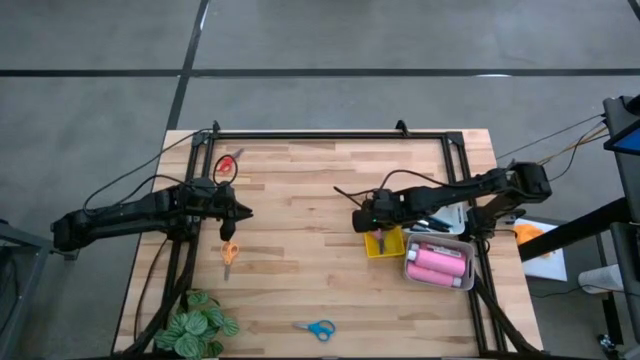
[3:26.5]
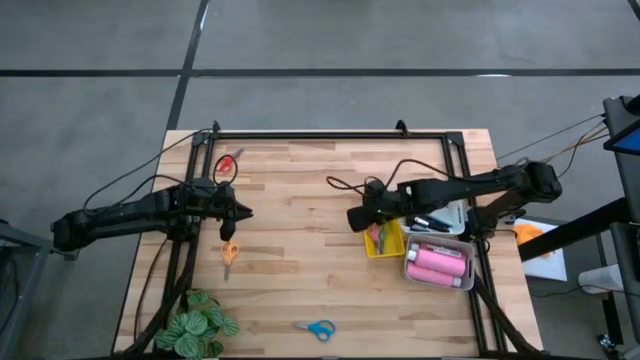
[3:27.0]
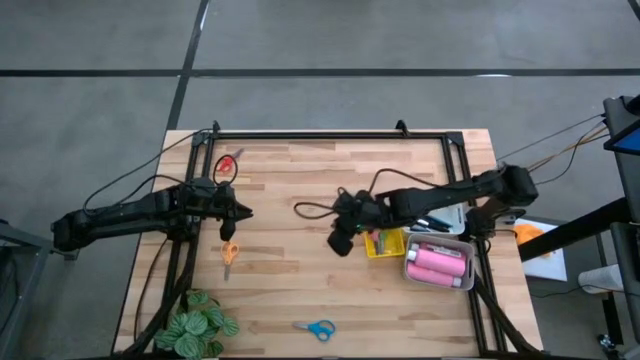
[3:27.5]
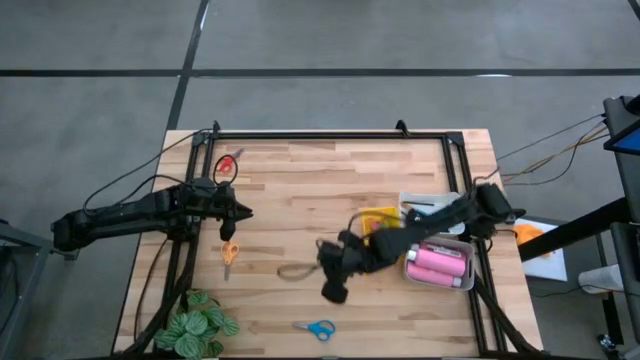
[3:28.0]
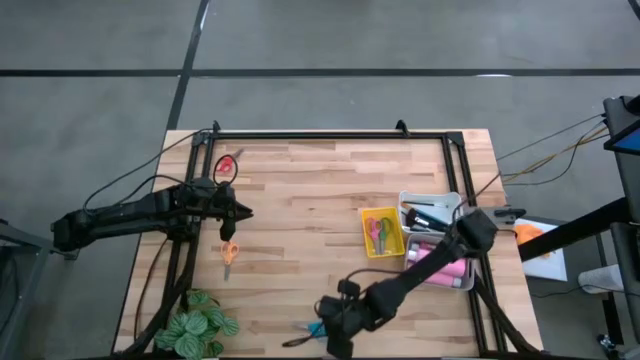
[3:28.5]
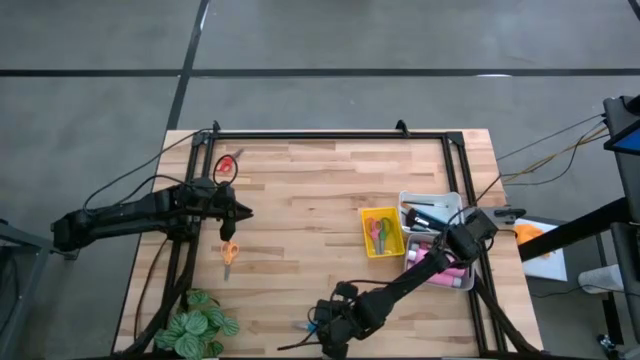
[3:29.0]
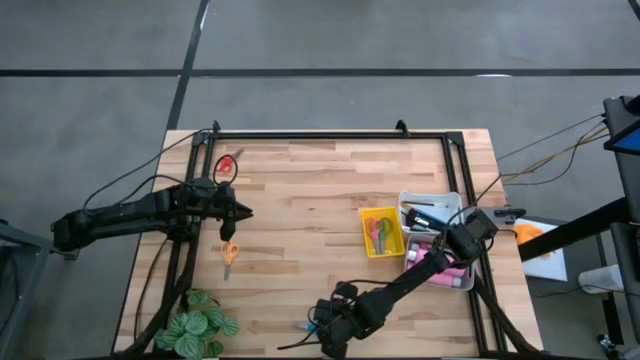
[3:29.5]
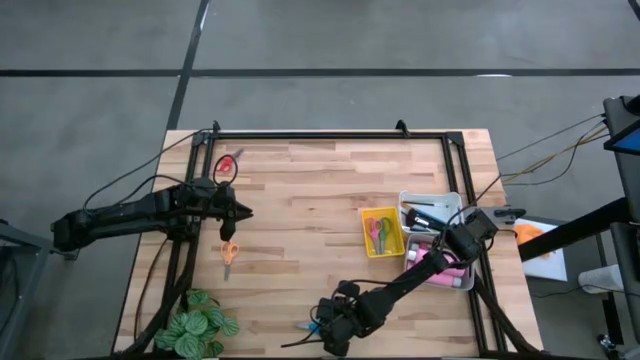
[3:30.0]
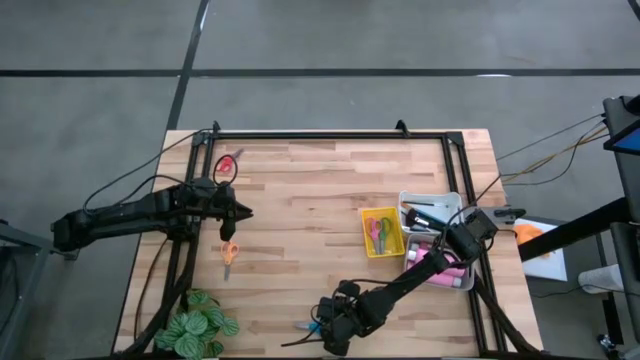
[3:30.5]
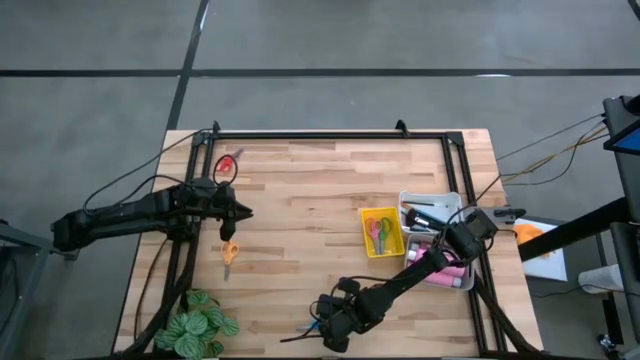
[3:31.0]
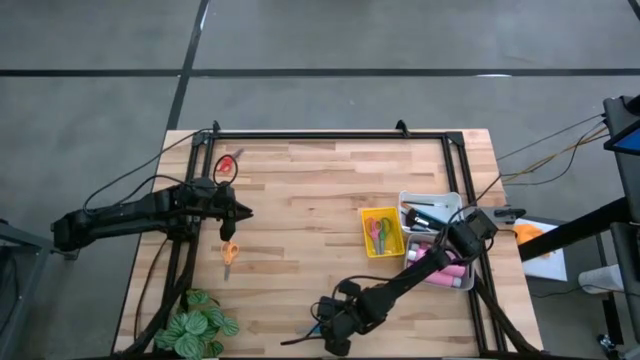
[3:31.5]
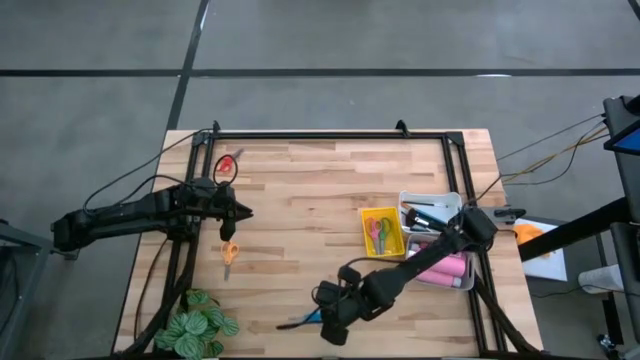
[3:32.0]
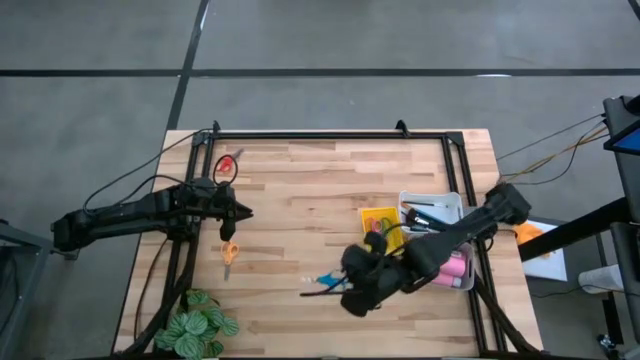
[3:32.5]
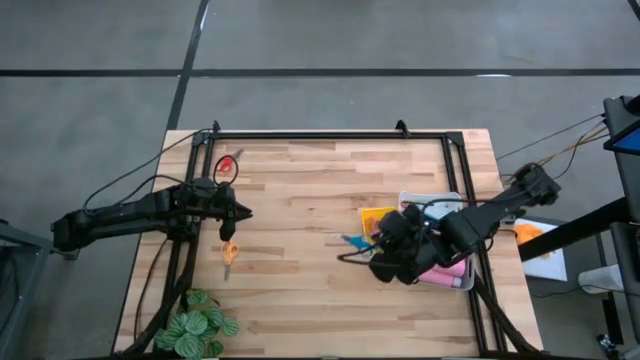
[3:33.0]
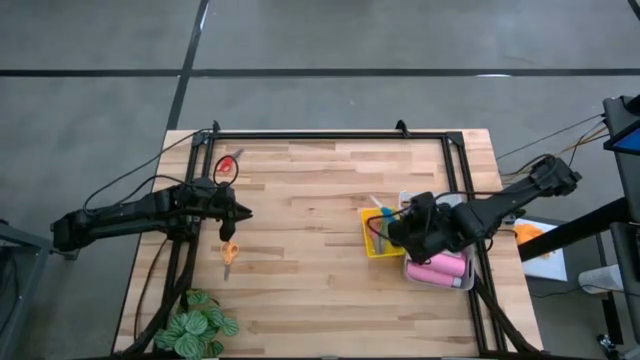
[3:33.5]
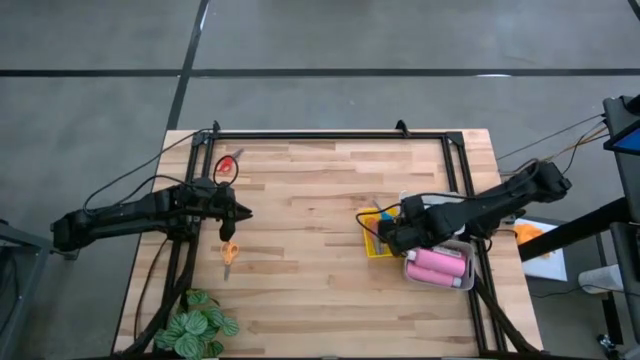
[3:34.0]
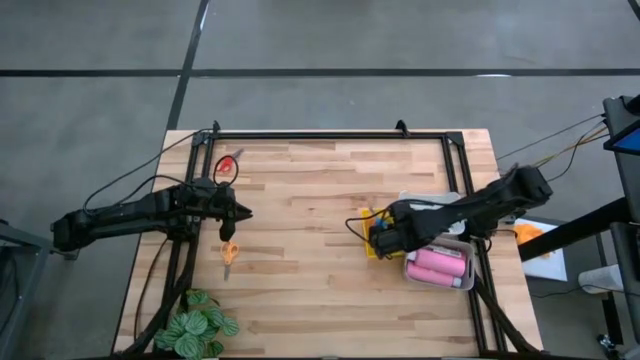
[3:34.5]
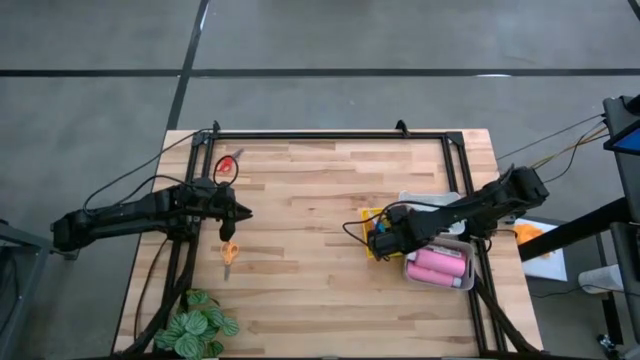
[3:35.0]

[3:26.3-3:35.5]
Task: Pick & Place Paint Supplies
Put the blue scissors into the yellow bin

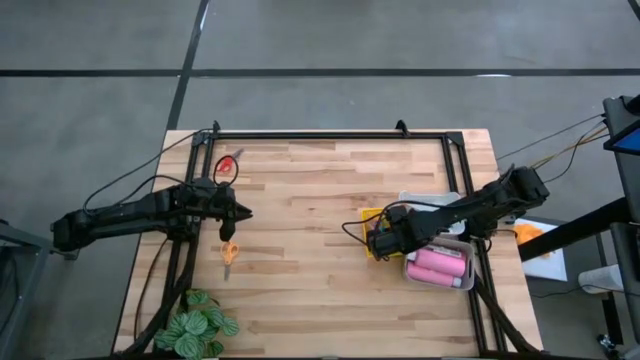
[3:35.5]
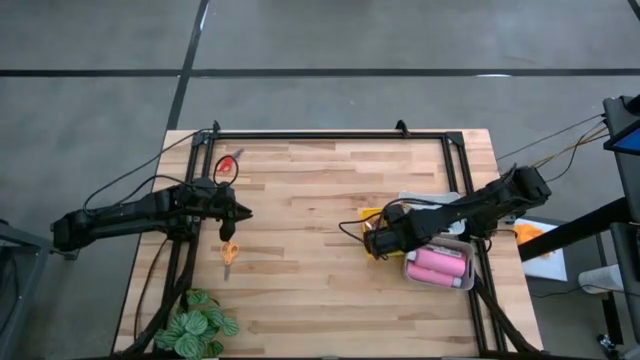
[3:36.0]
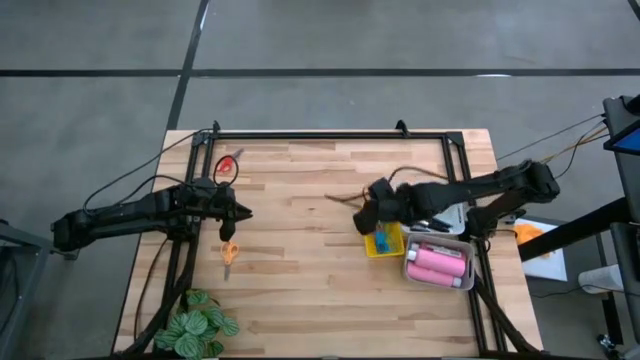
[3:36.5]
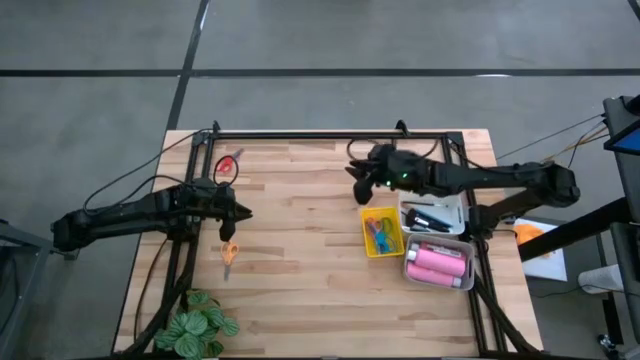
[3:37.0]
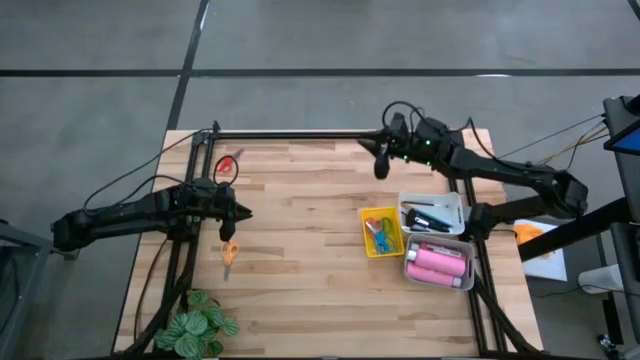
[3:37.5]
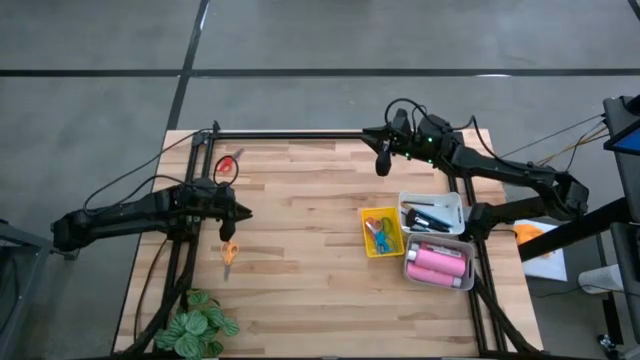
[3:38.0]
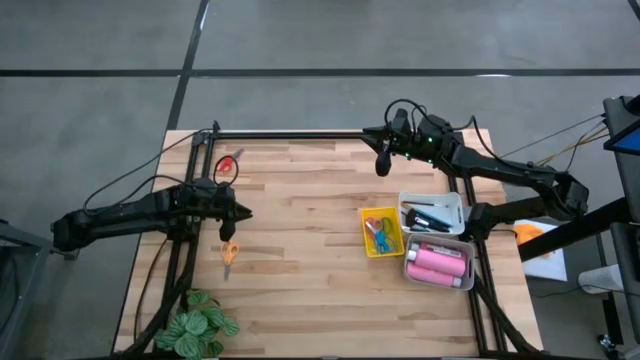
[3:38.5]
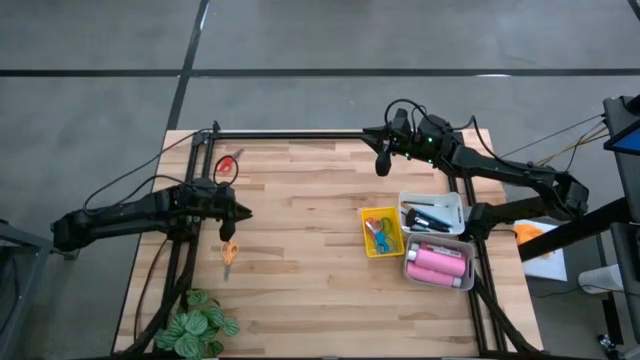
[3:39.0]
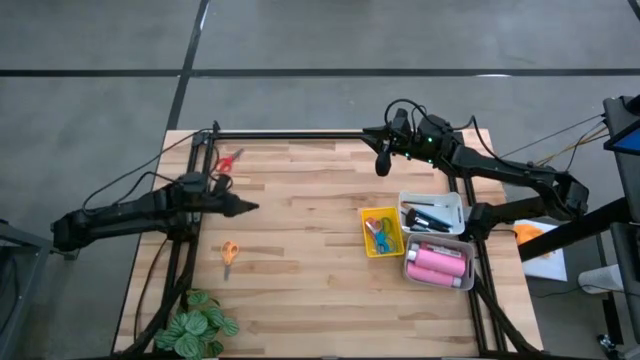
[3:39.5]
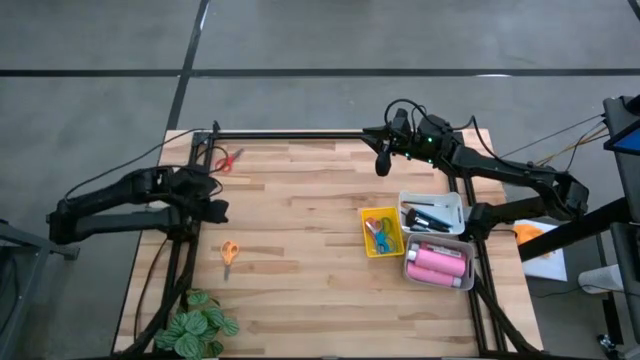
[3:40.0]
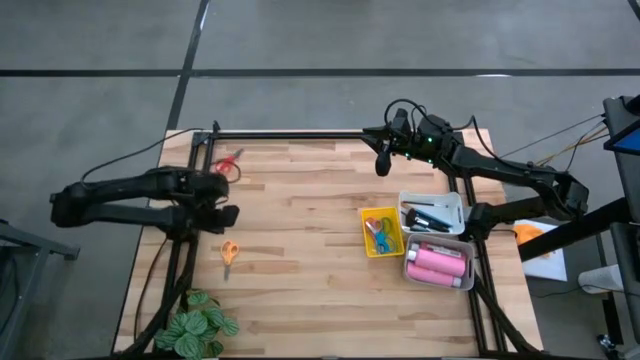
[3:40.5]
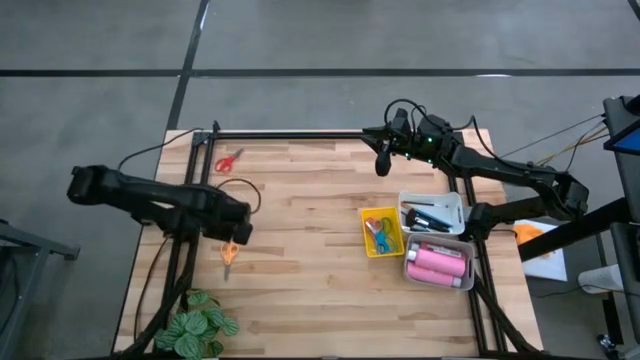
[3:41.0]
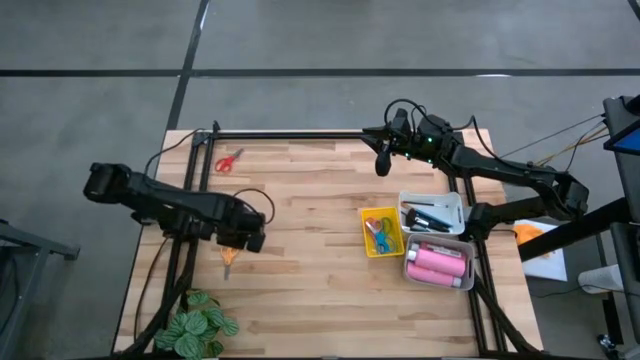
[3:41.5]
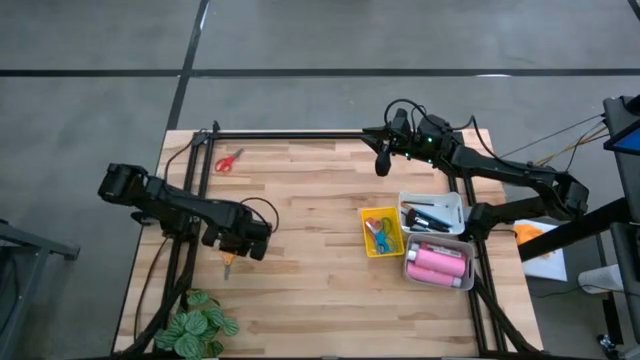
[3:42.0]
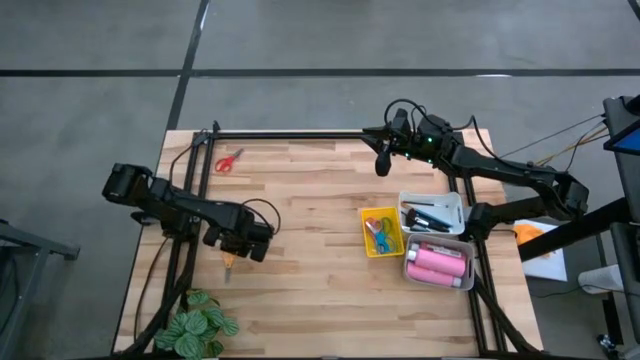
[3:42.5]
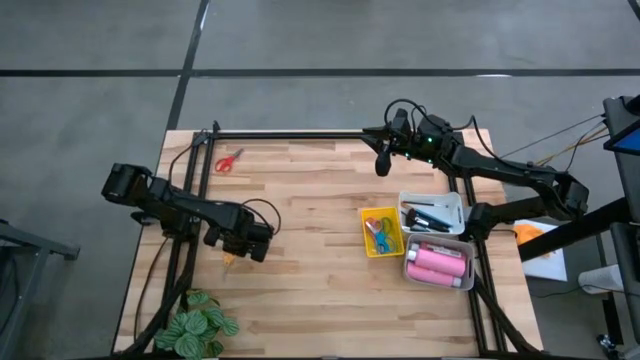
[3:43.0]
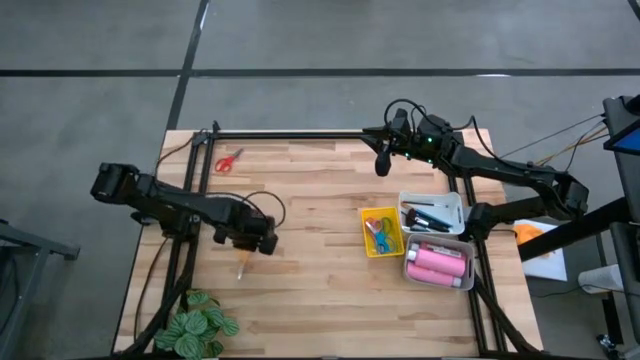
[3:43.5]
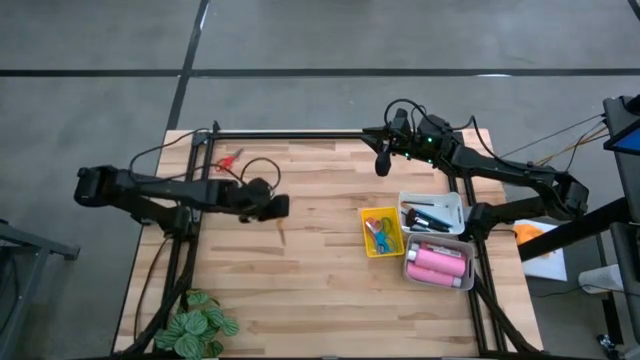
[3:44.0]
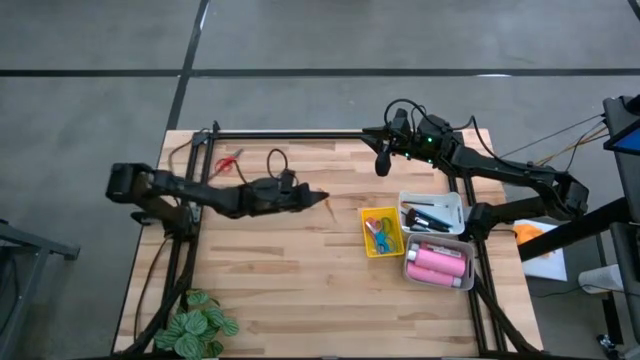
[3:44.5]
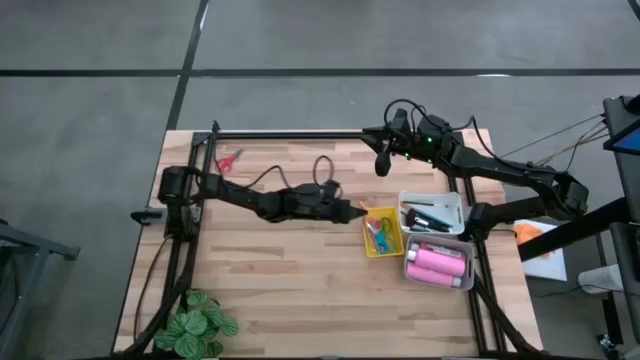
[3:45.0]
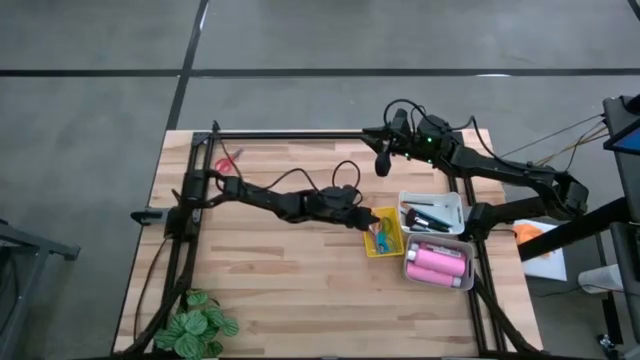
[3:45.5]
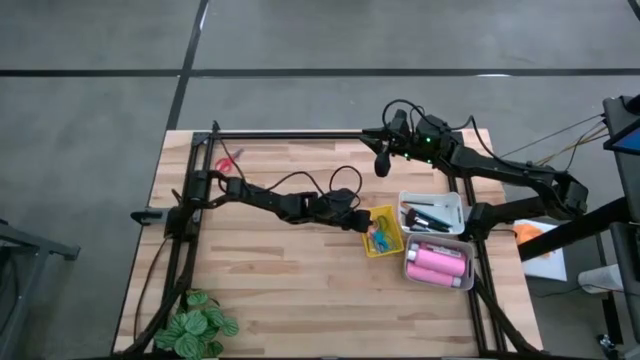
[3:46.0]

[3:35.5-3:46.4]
Put the yellow scissors into the yellow bin
